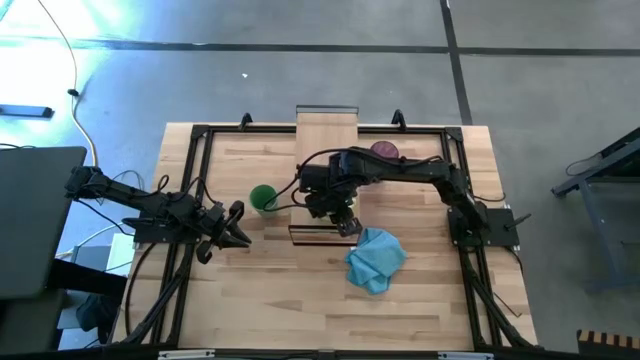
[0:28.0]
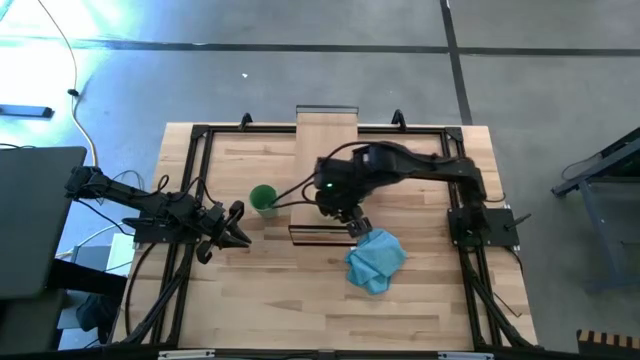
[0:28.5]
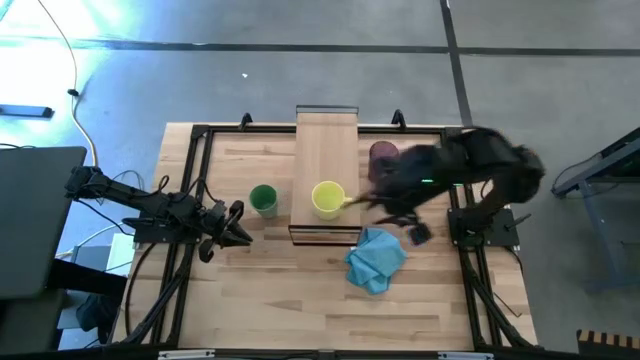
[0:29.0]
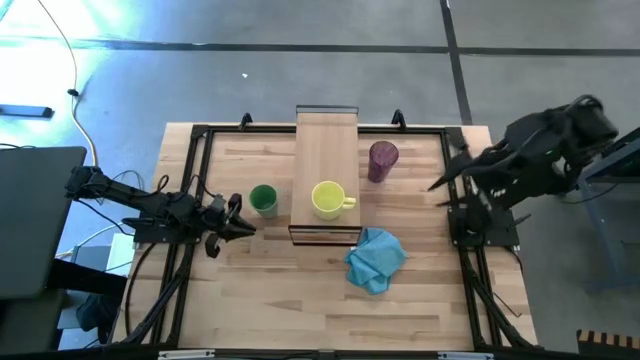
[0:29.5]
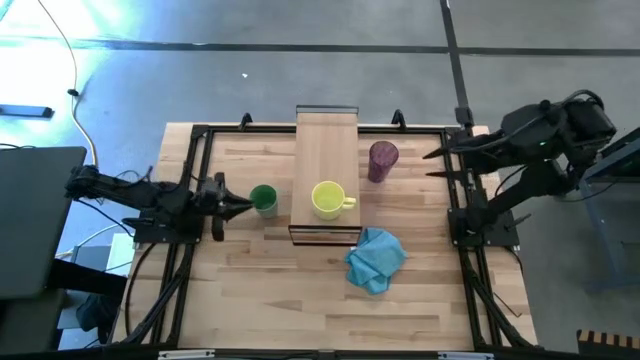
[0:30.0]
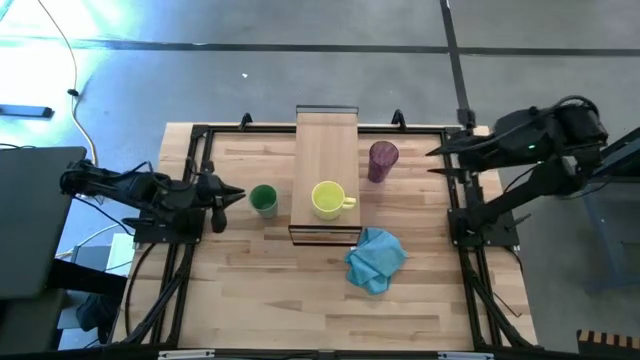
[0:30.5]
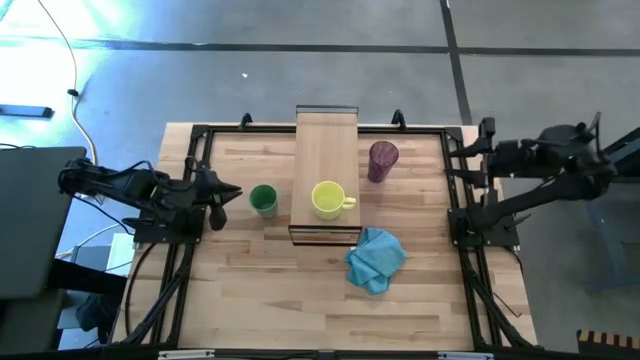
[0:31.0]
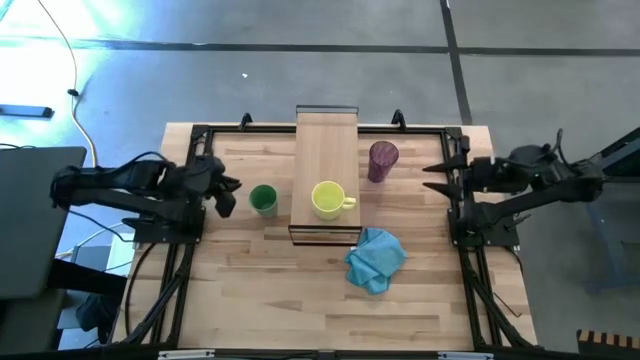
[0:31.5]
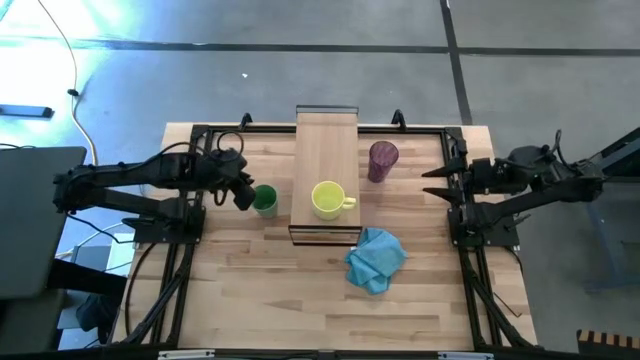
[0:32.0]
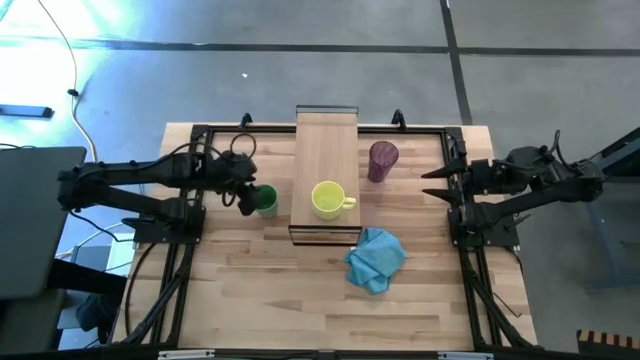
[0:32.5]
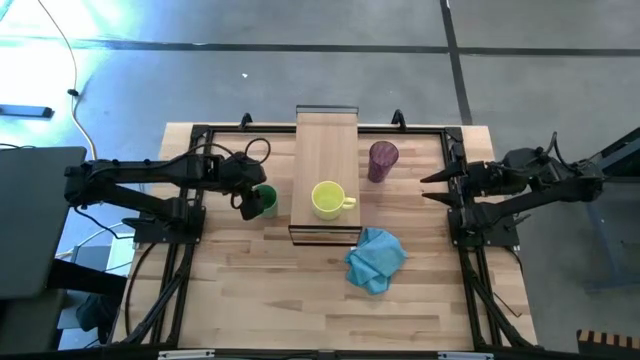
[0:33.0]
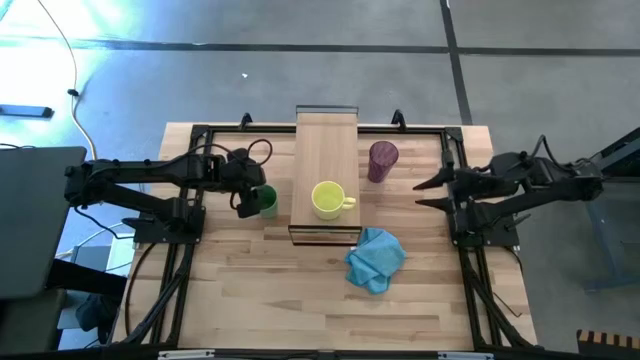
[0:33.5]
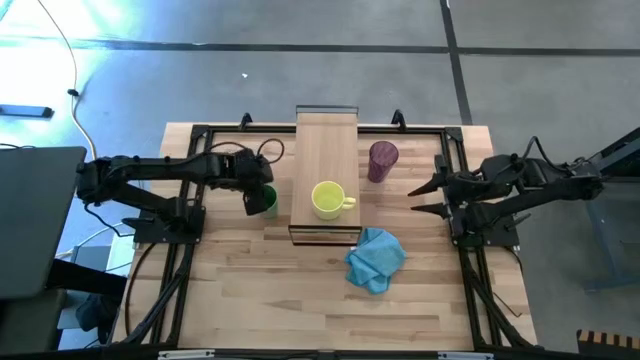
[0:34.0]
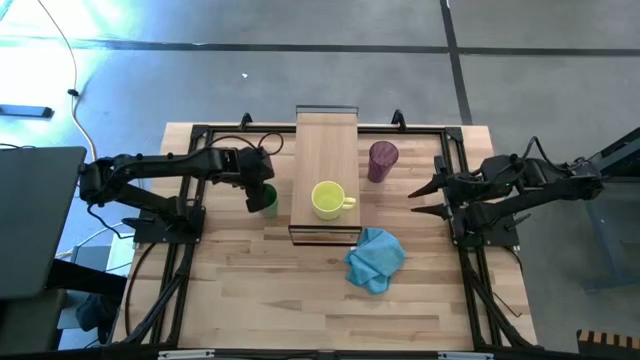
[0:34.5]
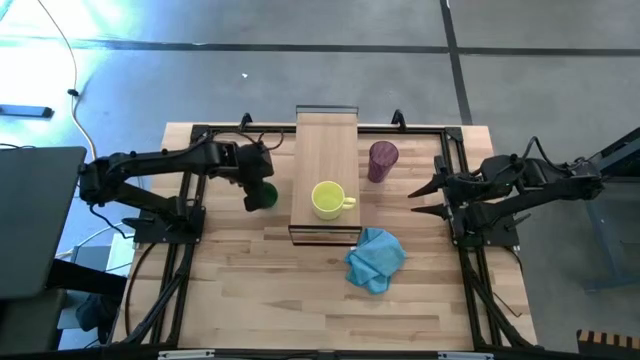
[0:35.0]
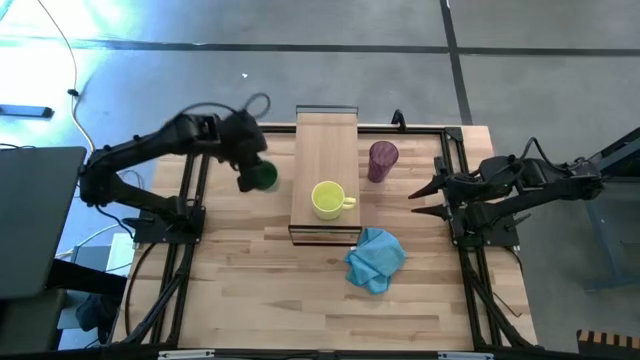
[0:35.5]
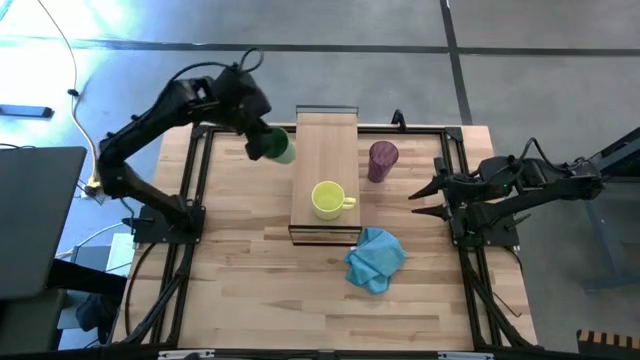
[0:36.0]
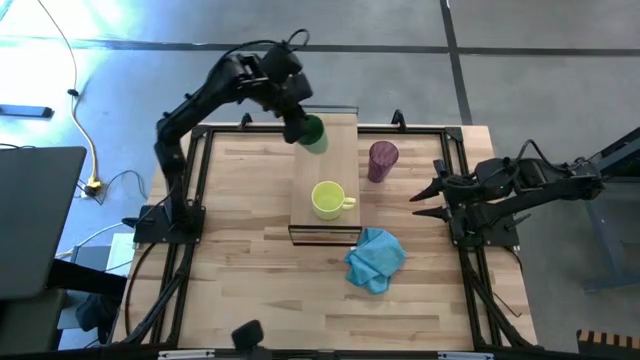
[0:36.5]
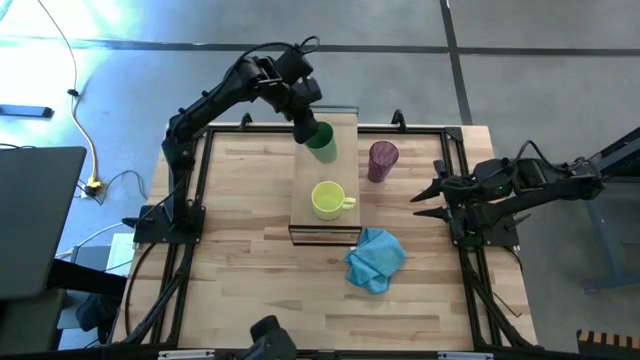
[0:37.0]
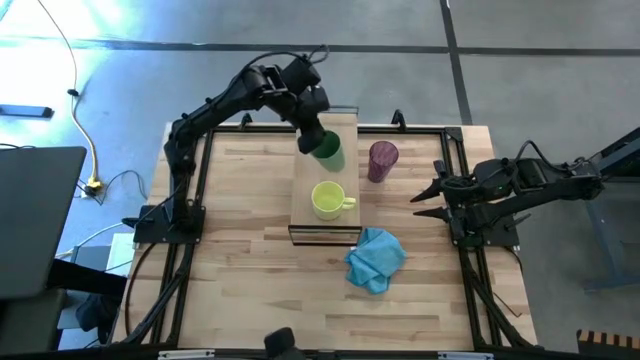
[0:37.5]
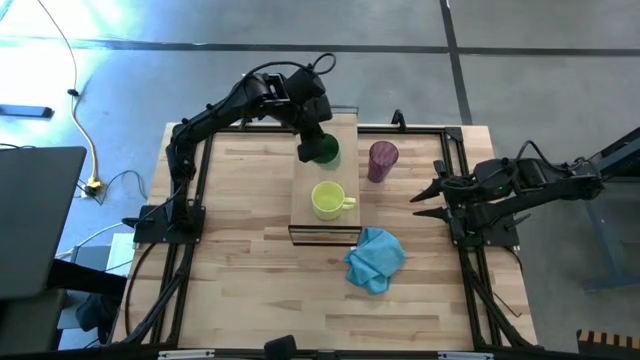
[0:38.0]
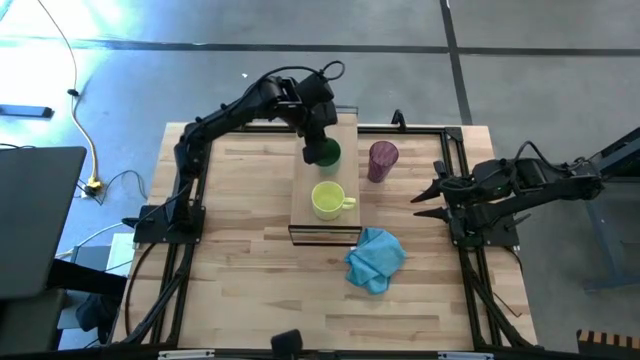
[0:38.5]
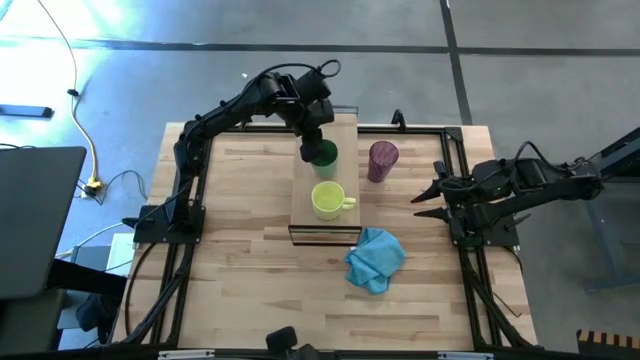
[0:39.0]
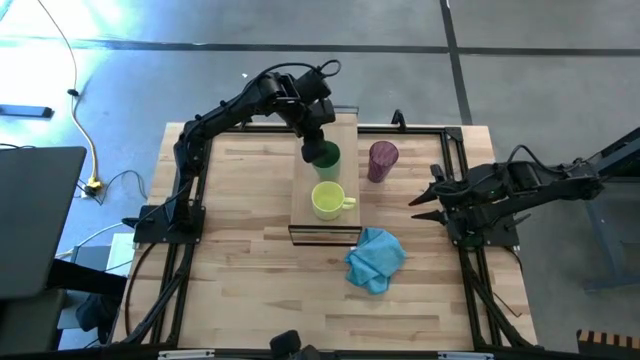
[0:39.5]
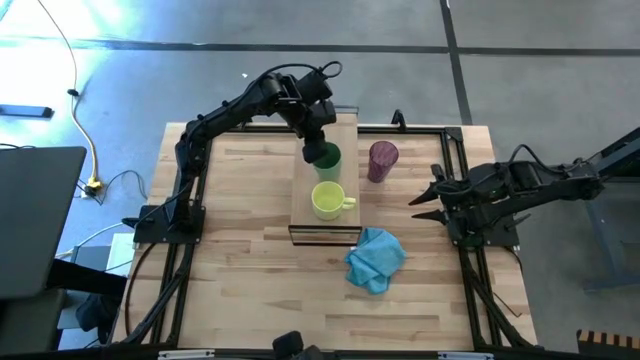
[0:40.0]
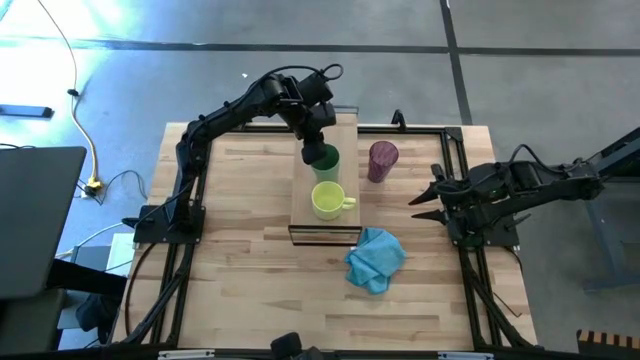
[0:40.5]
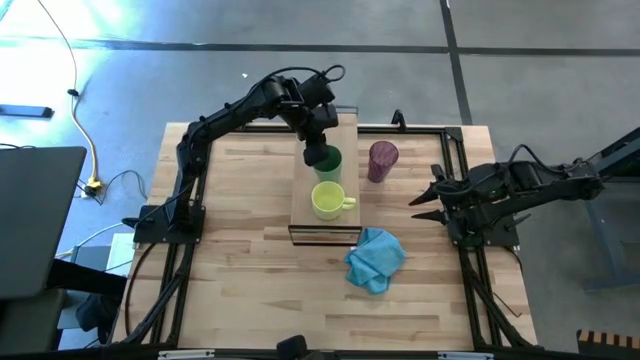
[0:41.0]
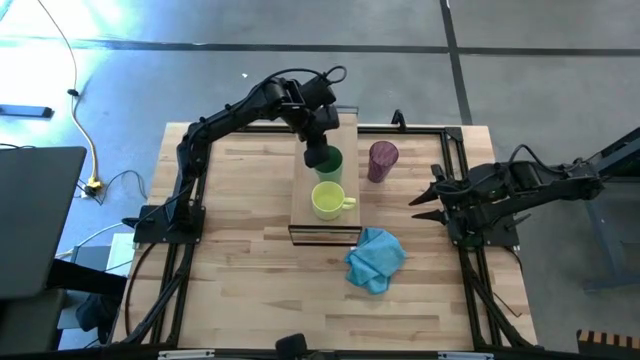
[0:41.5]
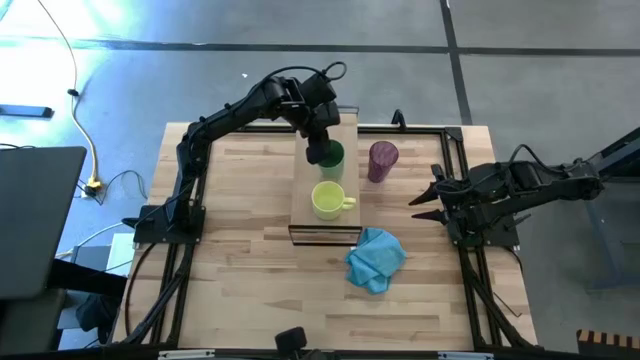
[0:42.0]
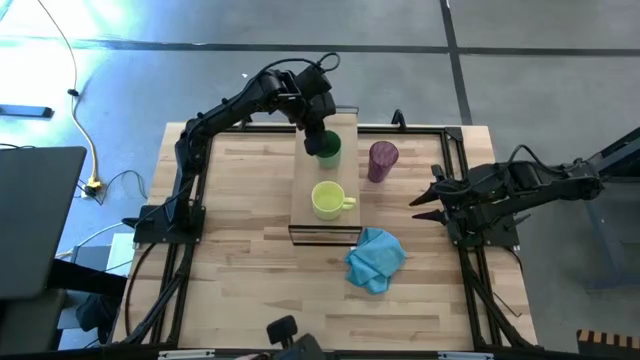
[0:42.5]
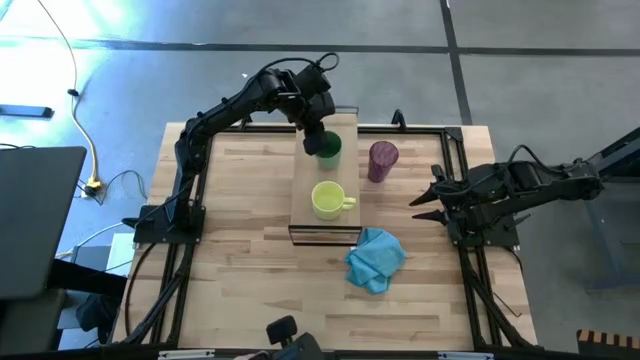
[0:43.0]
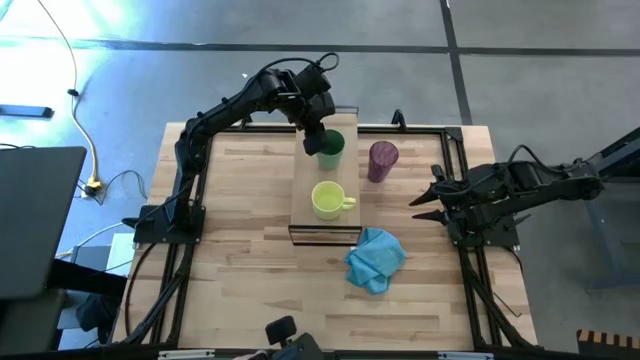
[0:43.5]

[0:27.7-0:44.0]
Task: Stack small to large cups/mugs on shelf
Put the green cup on the shelf

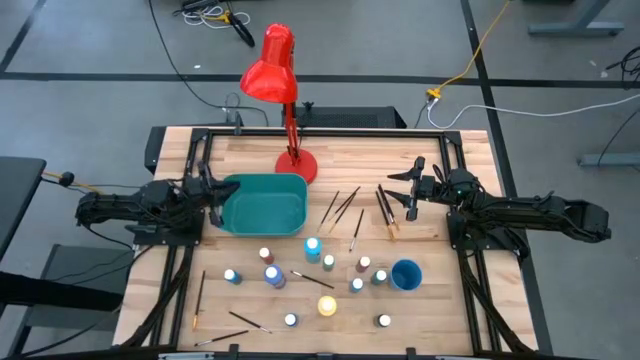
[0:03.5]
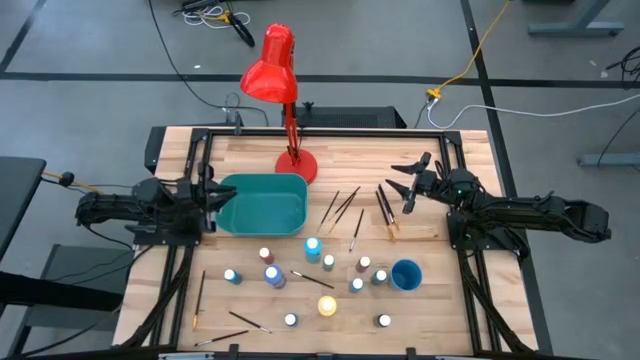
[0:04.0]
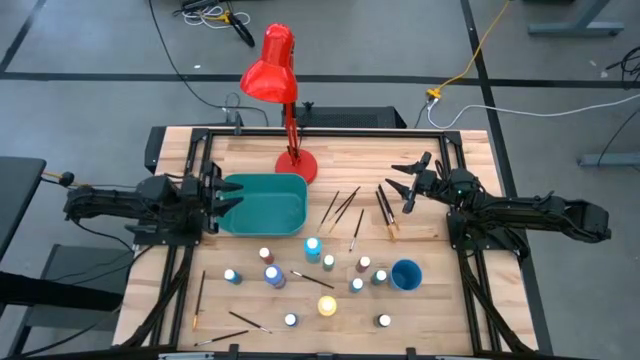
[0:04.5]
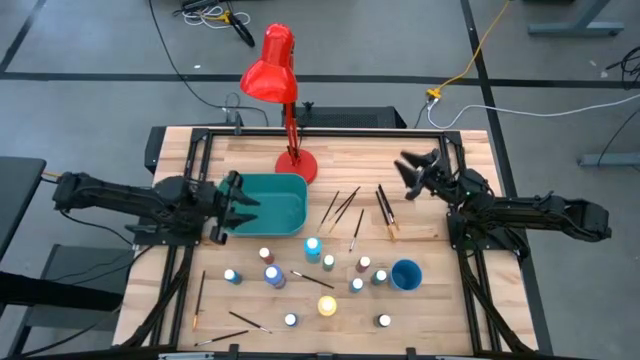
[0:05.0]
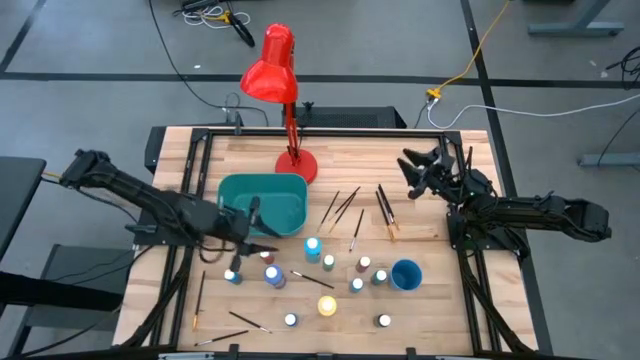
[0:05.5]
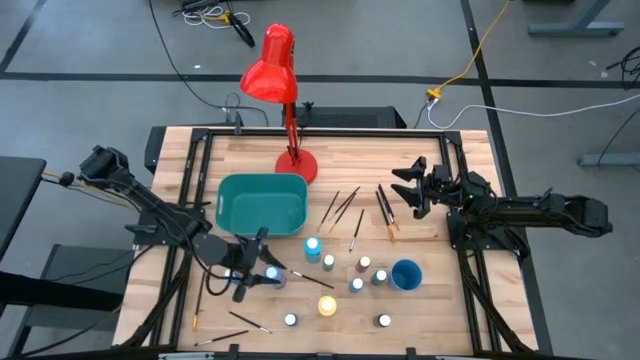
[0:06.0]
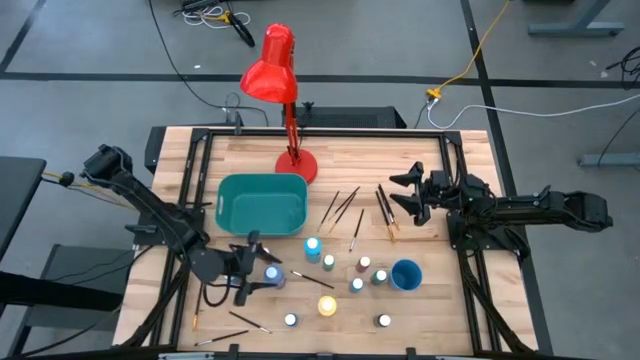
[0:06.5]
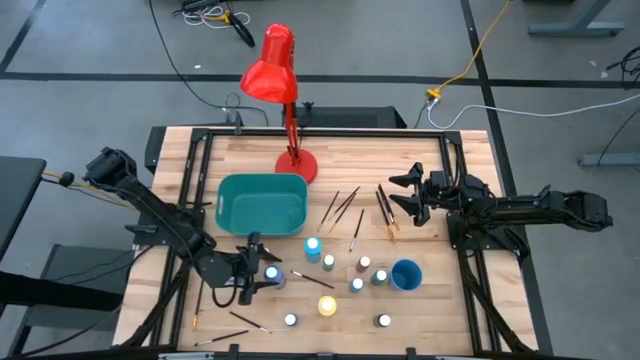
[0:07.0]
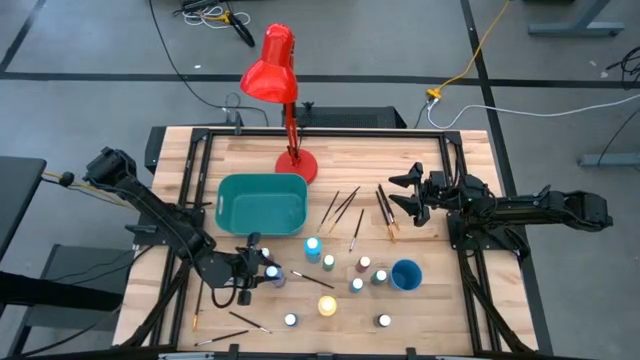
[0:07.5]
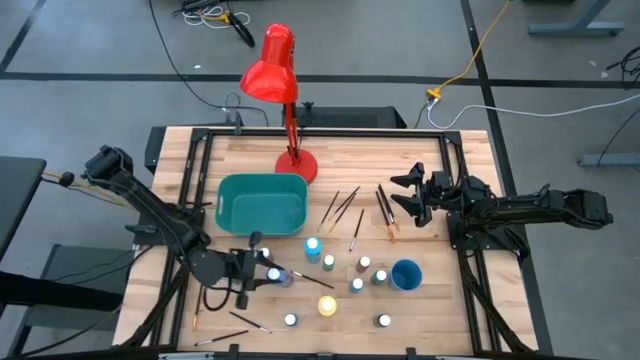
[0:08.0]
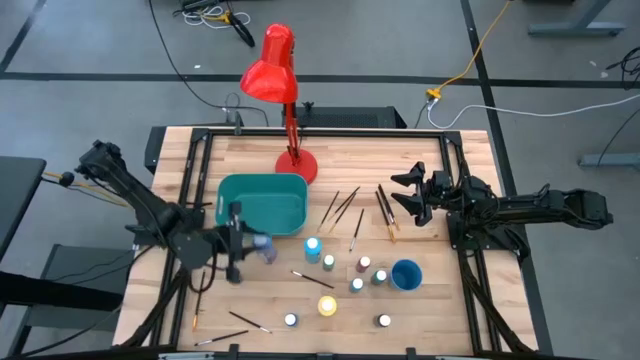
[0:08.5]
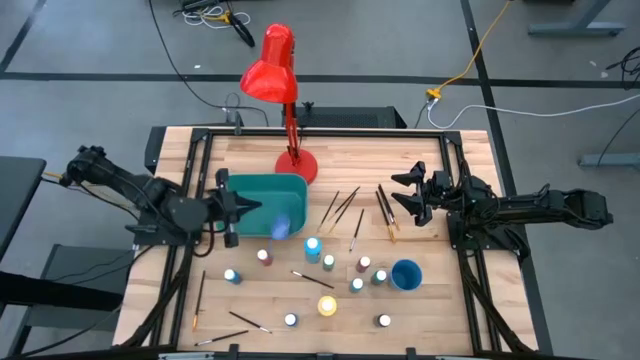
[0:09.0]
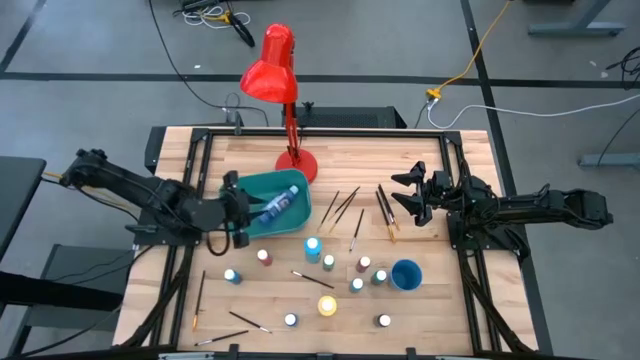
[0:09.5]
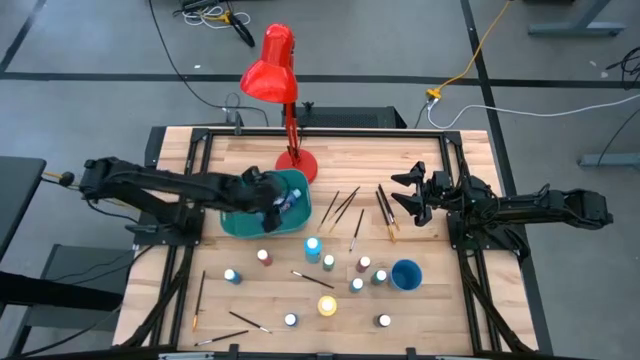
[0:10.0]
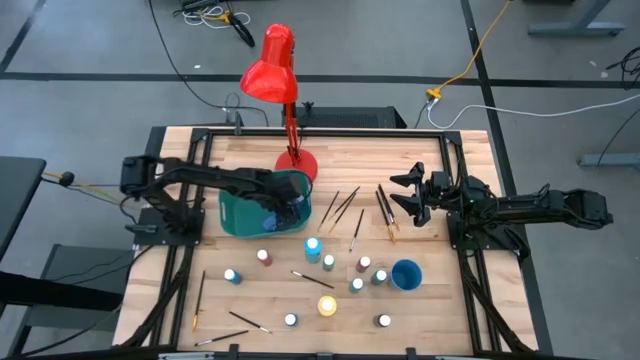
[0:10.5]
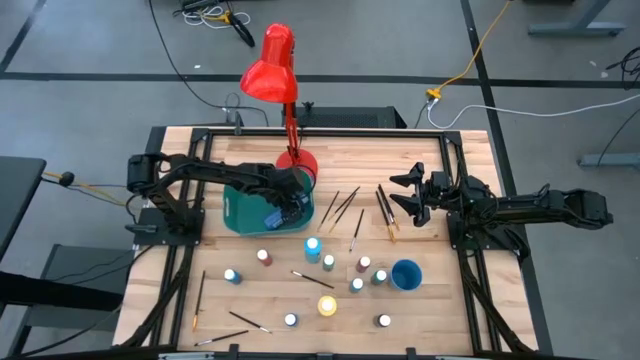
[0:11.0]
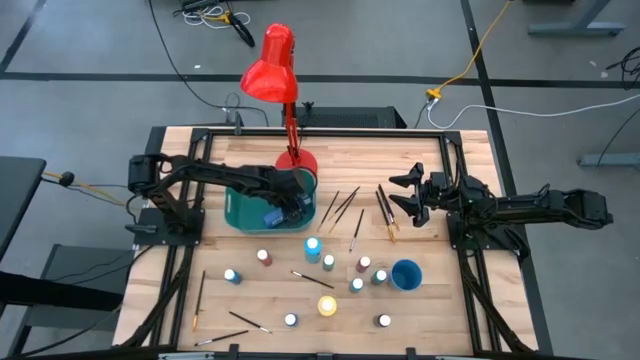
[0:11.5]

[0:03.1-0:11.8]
Task: Pick & Place Paint Supplies
Put the large purple paint bottle into the green bin
